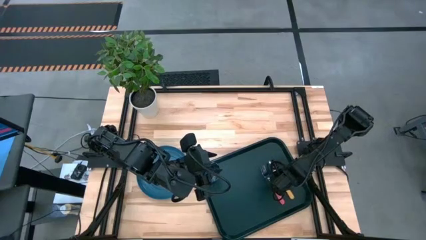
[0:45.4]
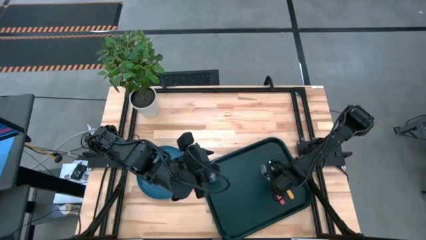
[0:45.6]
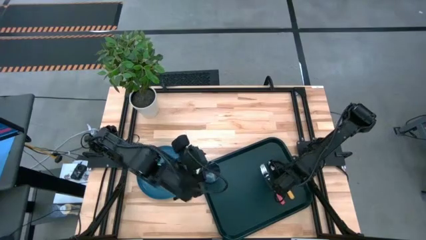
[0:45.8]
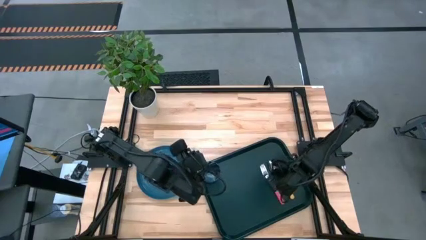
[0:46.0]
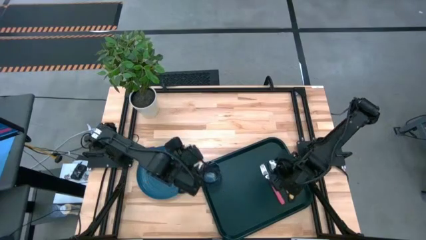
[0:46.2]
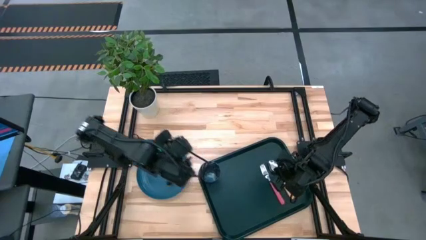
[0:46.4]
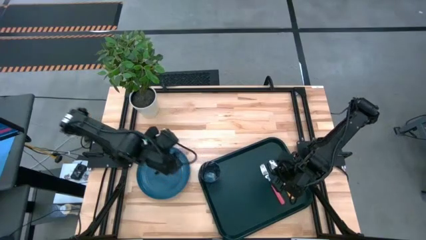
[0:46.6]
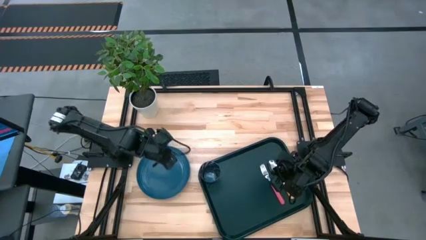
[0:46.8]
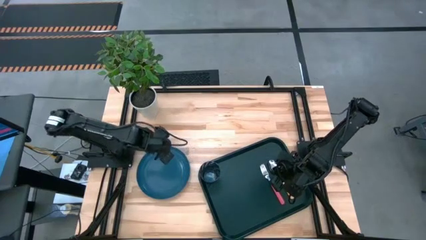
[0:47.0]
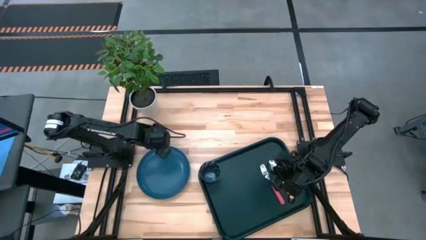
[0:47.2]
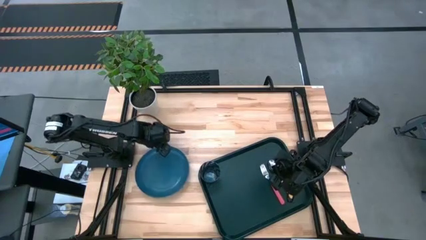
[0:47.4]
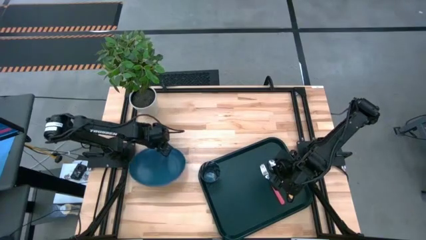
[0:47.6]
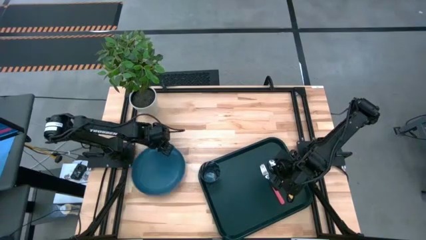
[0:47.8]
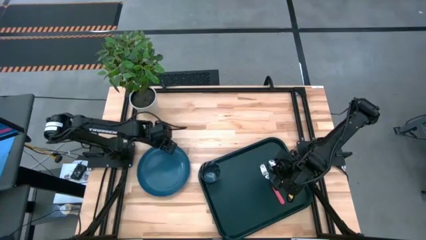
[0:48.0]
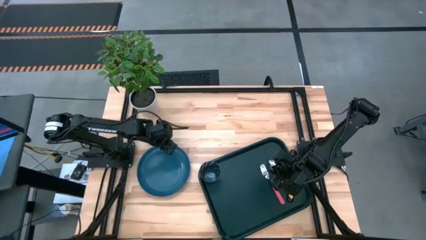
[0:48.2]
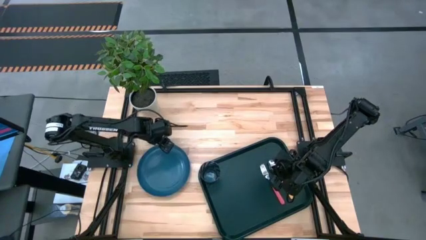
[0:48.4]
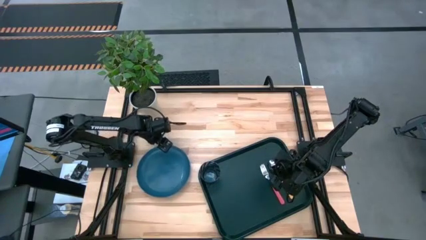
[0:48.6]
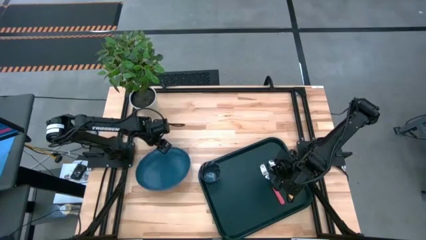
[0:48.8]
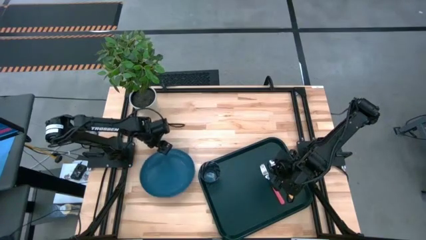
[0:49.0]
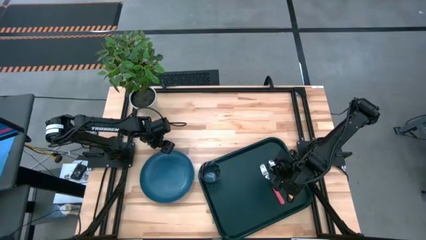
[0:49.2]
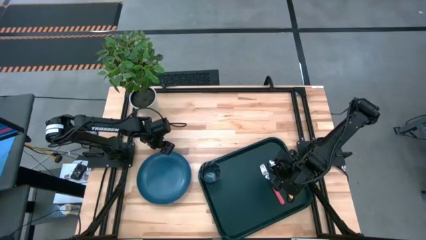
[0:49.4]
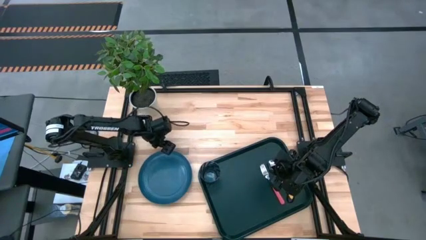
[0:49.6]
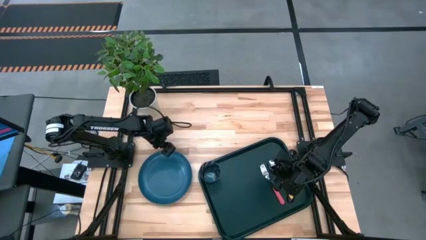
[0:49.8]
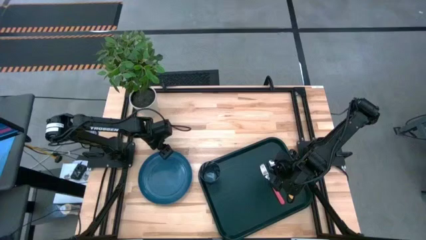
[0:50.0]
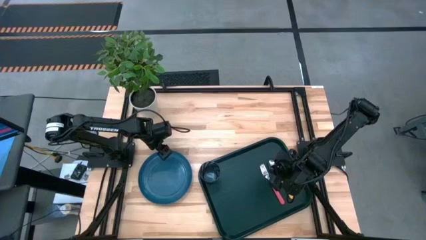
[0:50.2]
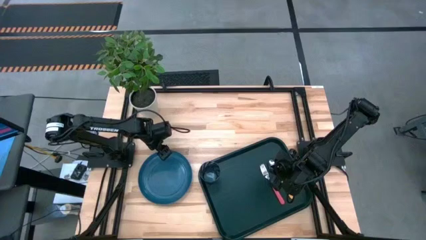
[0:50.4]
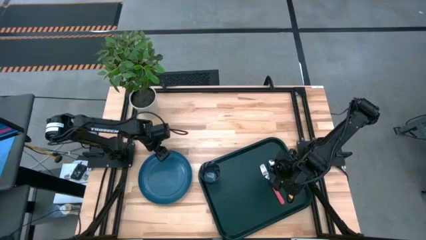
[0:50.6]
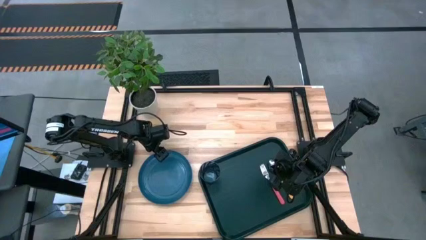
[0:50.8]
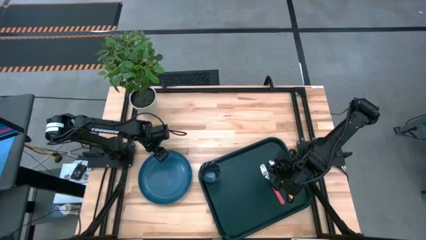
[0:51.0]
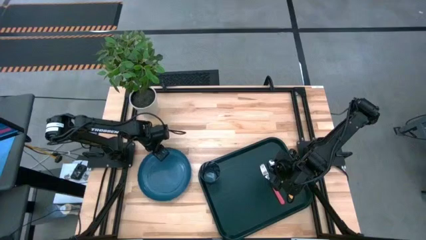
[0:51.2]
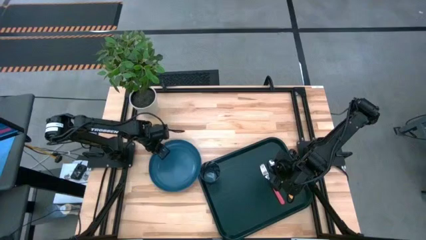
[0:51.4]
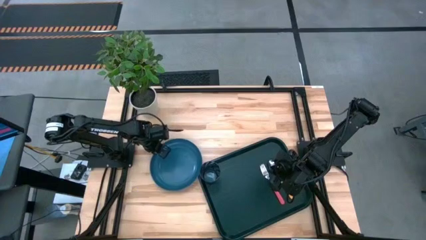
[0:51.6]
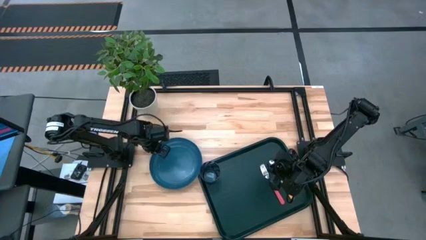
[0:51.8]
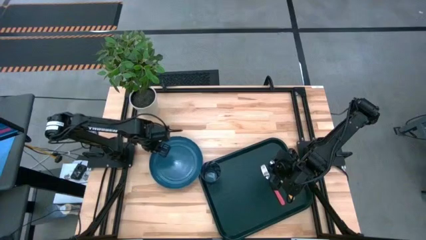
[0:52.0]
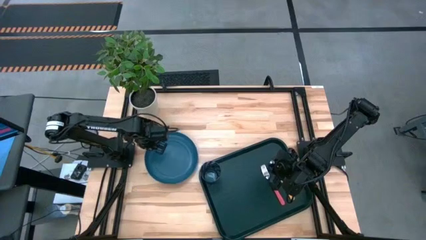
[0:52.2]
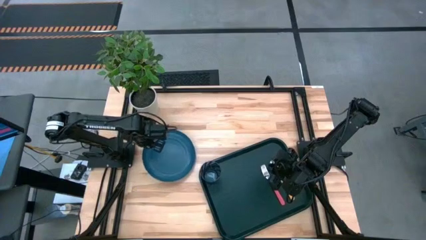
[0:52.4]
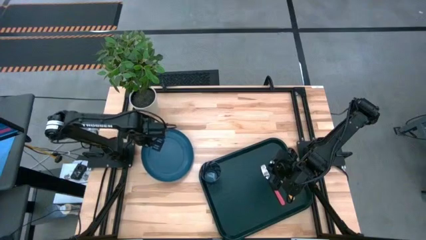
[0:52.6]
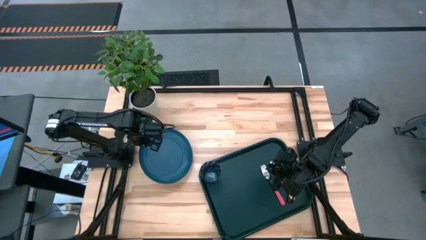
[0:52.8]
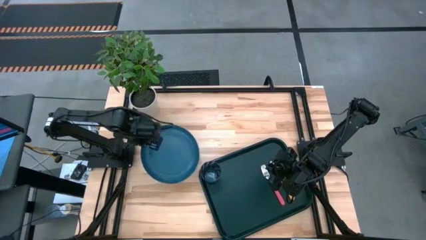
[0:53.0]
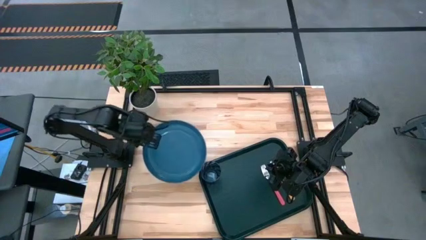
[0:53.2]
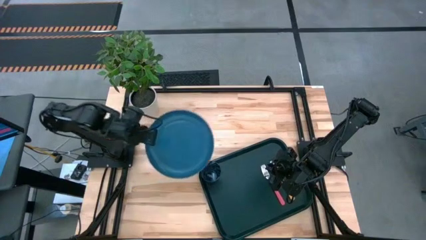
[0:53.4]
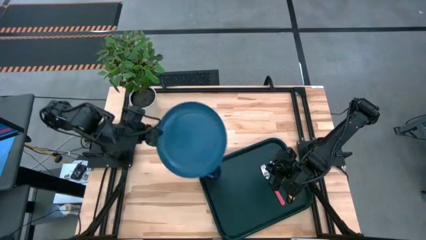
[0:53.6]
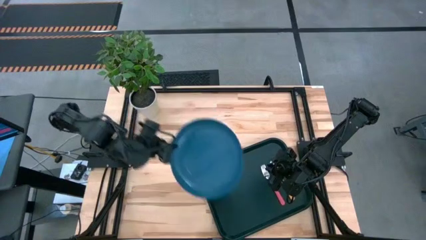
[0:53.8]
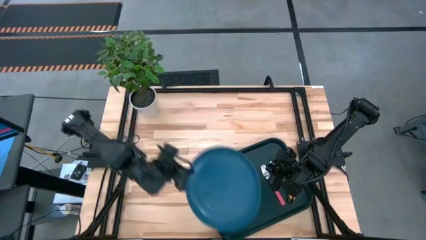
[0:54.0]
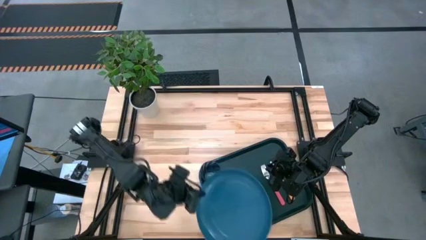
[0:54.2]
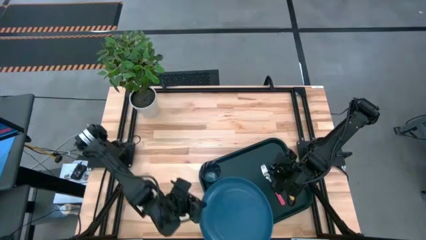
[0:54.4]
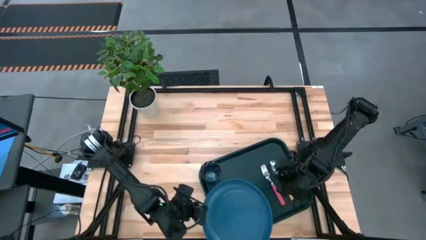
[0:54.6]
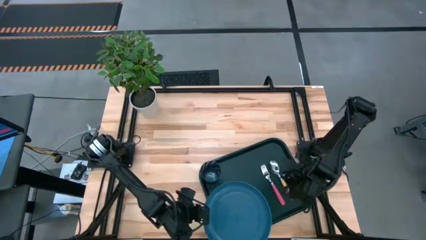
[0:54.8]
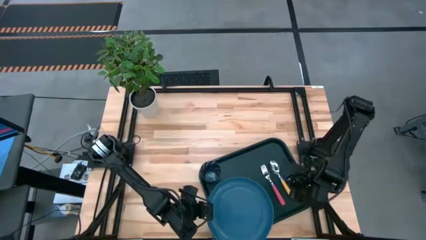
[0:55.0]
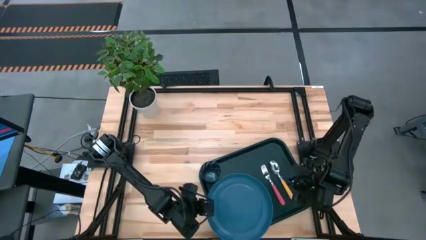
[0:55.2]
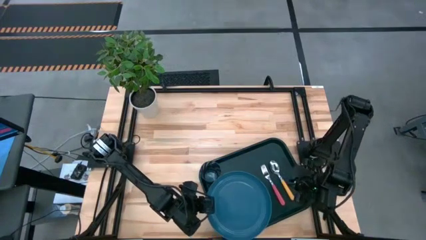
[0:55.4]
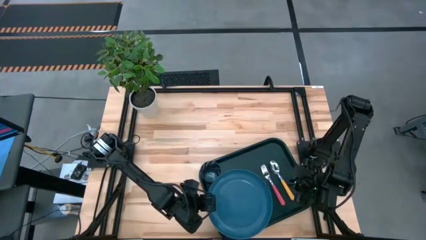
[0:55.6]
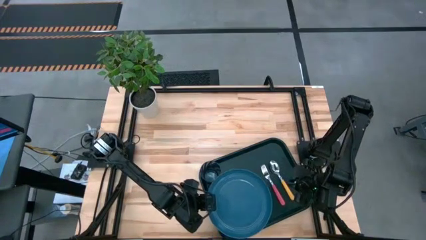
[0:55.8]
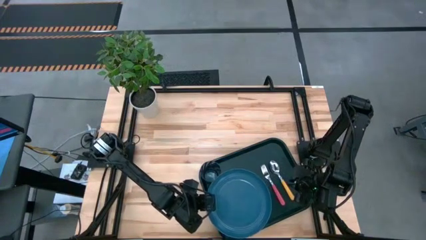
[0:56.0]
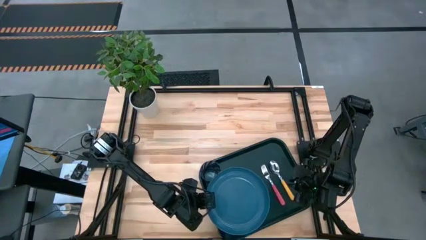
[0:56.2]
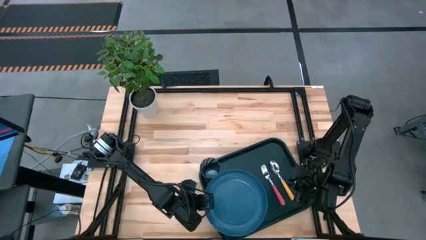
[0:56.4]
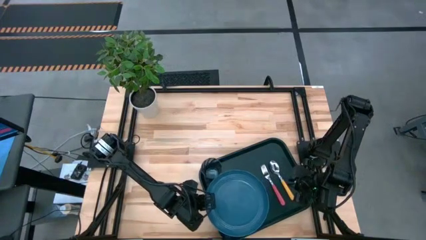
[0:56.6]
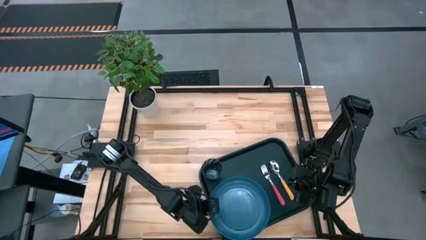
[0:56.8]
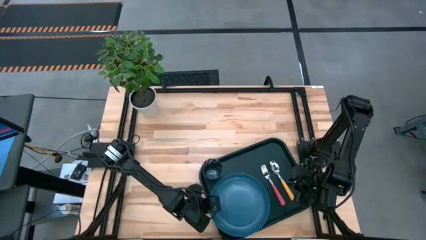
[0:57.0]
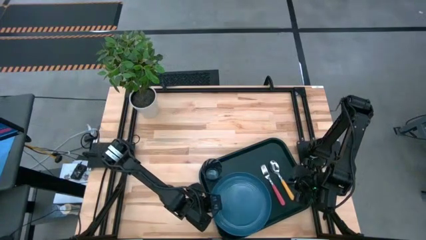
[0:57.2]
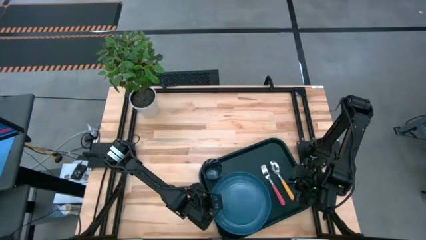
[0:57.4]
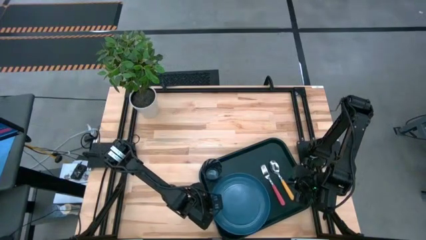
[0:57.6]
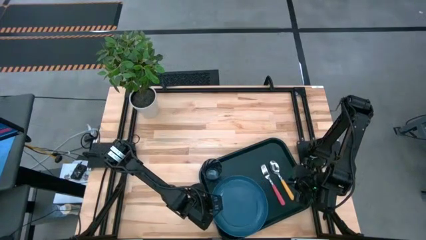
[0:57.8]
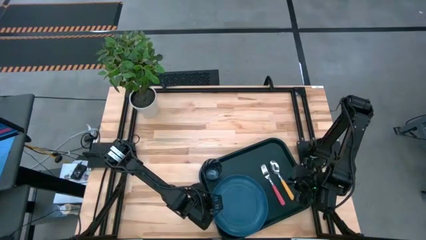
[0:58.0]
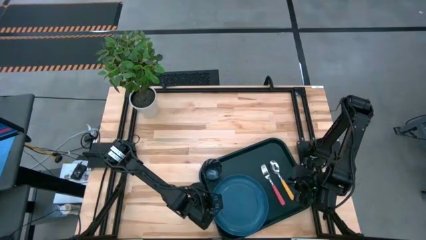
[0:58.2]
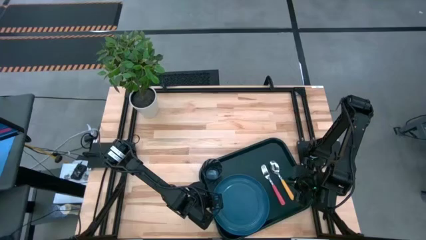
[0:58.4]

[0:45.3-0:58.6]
Task: Pick and place plate/cup/fork/spoon on tray
Put the blue plate to the left of the pink fork on the tray

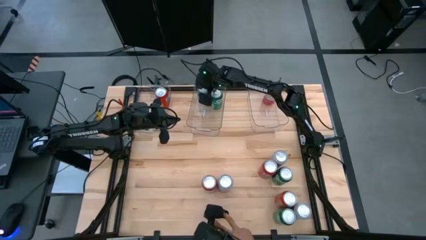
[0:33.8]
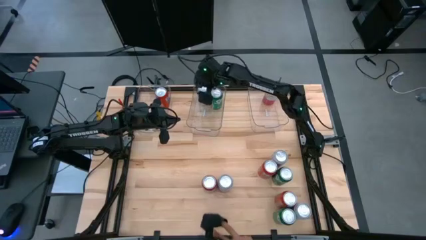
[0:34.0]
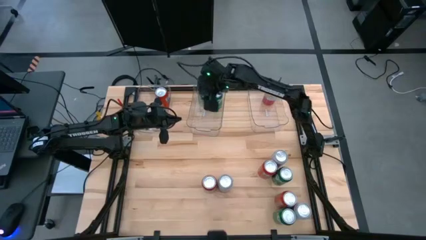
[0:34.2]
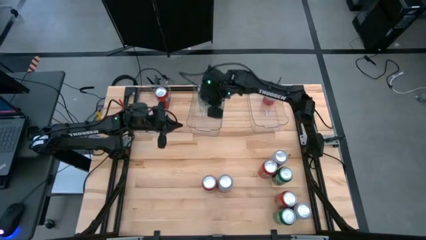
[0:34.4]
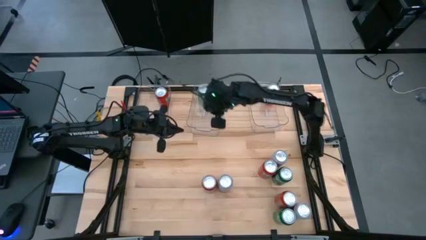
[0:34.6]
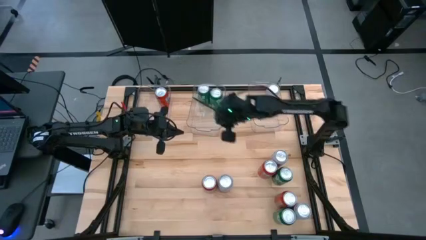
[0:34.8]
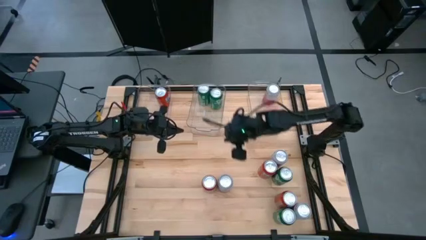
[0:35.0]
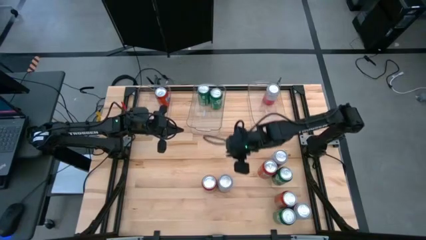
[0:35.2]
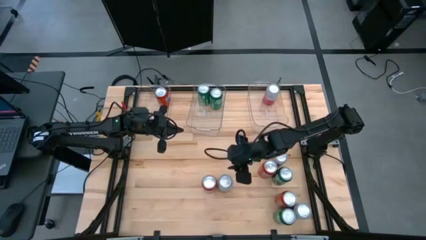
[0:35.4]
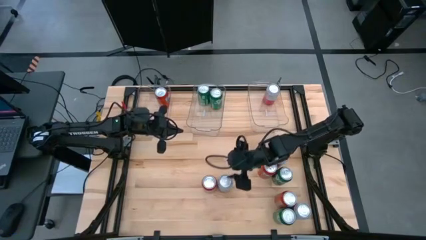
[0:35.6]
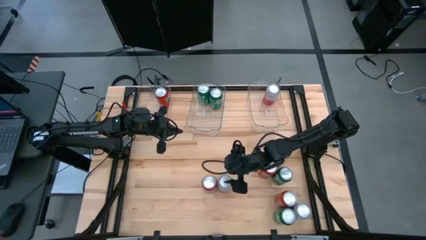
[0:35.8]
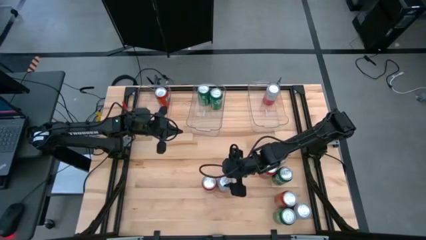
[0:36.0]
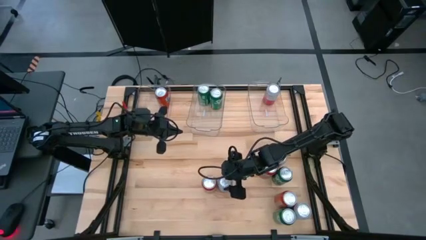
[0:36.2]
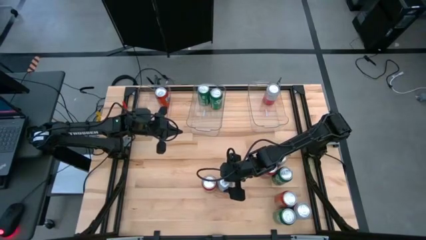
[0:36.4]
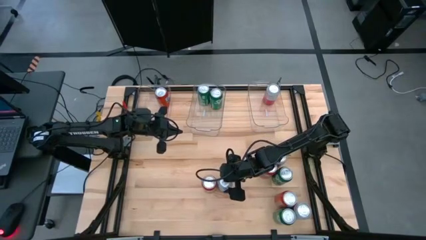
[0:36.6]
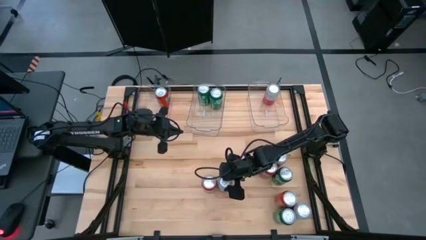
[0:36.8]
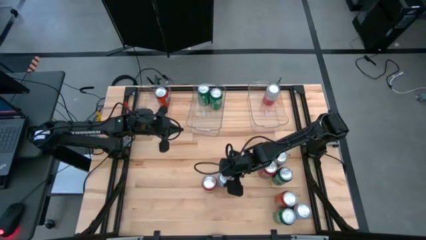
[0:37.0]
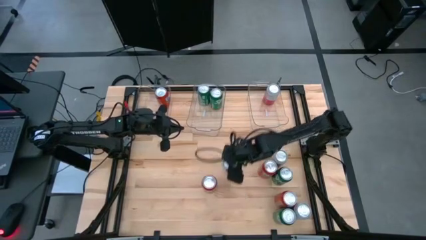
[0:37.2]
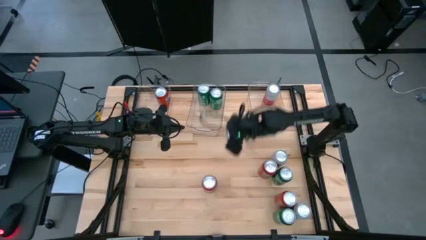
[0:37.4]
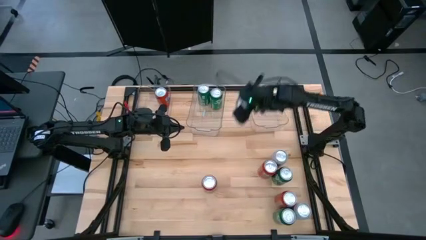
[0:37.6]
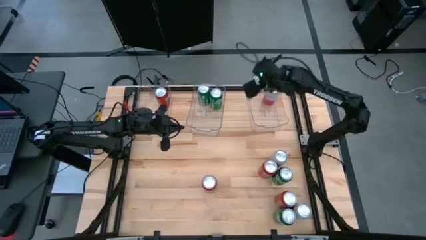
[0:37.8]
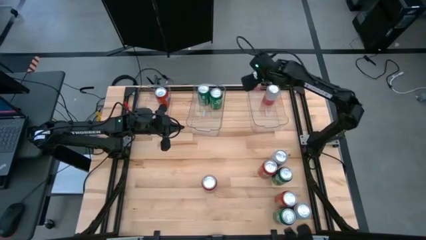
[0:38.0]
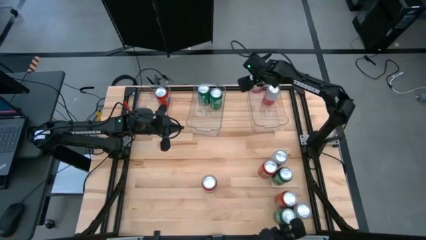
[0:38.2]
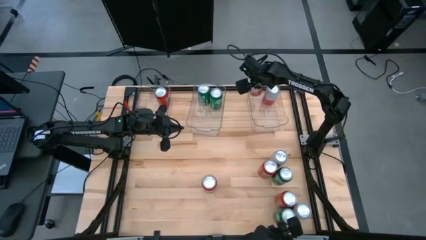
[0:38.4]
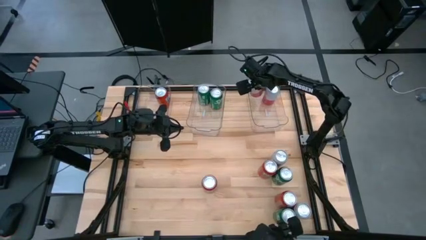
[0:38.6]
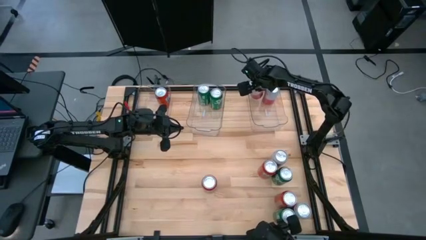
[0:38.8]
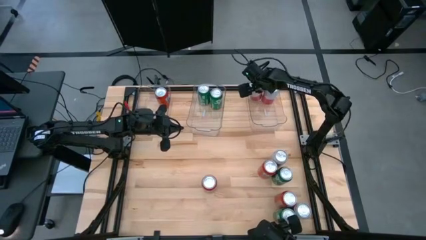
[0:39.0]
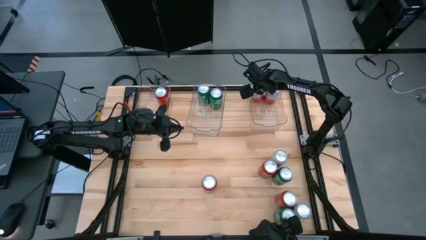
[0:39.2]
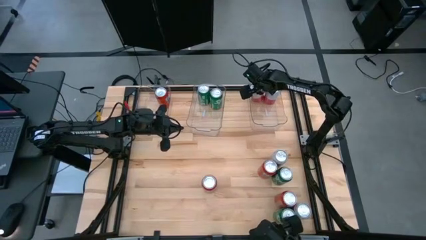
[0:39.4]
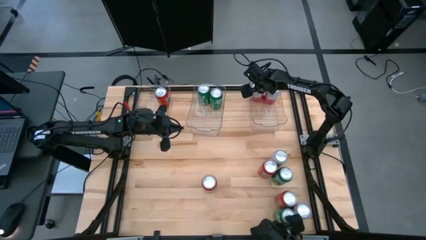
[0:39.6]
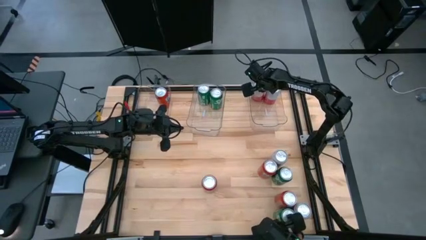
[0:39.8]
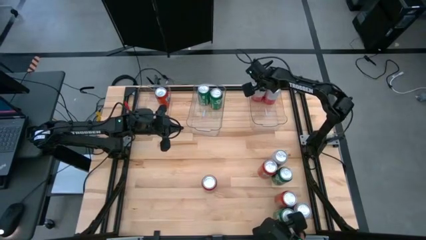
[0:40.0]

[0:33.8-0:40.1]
Task: Sort soda cans
Put the left pink white soda can into the right transparent bin
